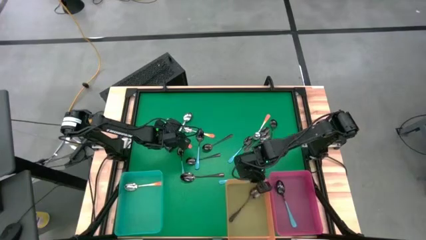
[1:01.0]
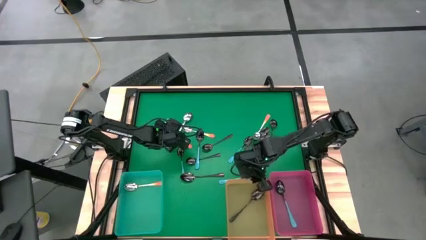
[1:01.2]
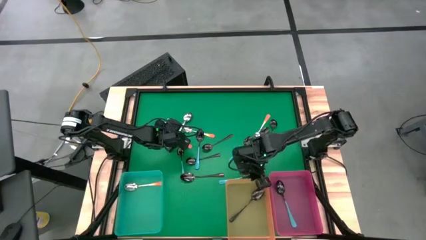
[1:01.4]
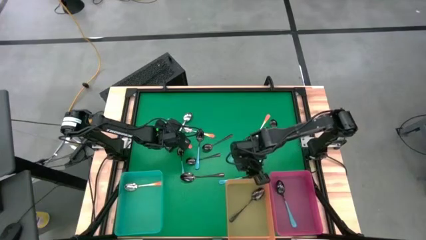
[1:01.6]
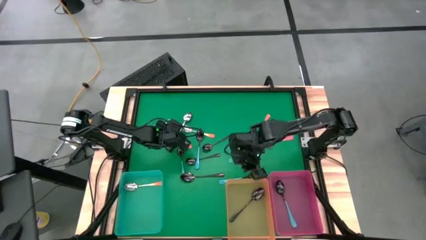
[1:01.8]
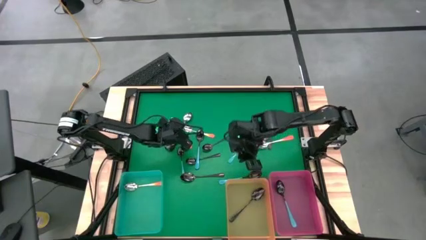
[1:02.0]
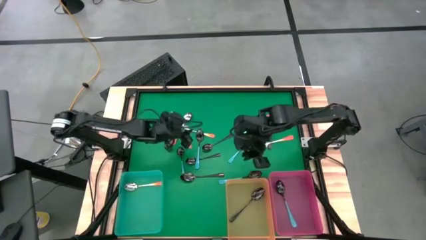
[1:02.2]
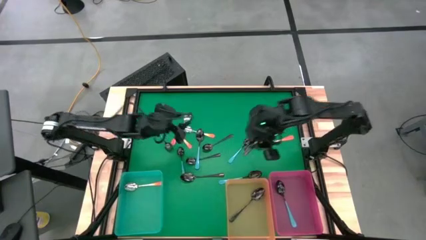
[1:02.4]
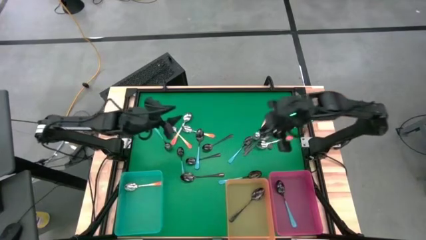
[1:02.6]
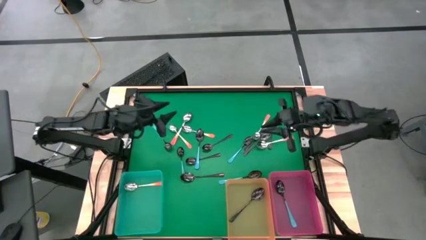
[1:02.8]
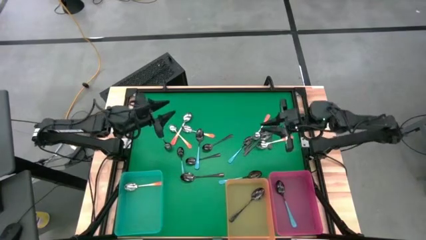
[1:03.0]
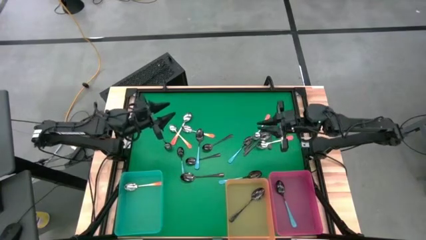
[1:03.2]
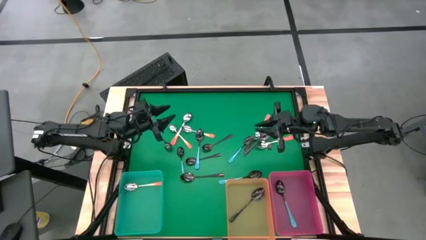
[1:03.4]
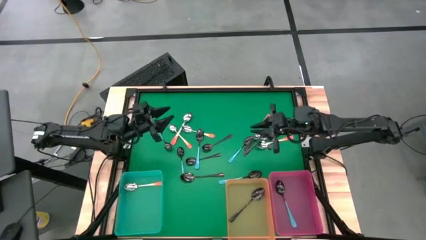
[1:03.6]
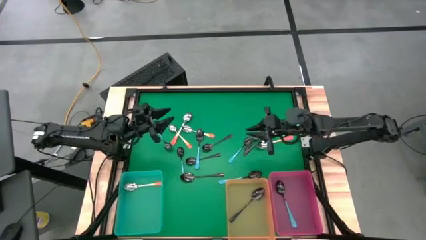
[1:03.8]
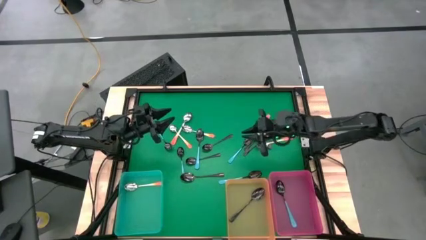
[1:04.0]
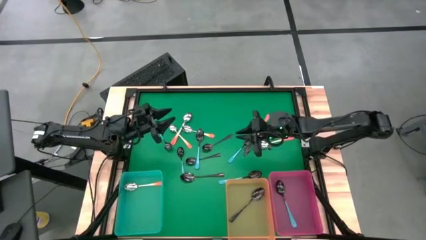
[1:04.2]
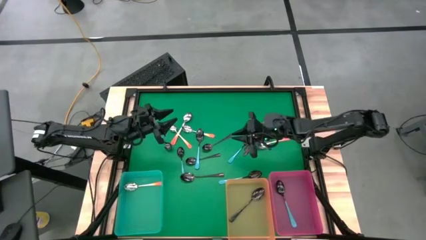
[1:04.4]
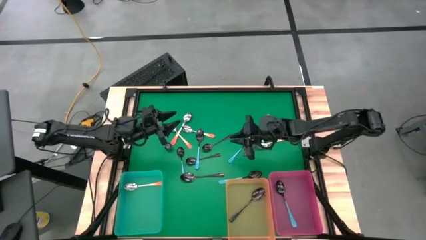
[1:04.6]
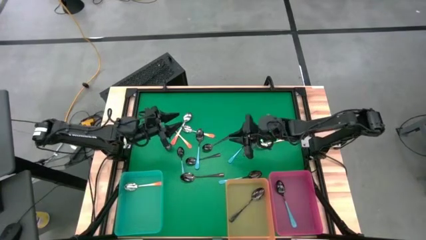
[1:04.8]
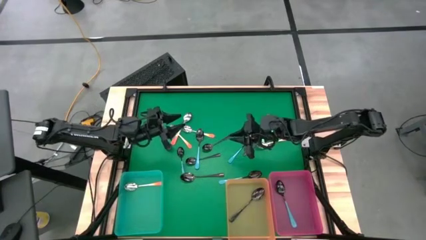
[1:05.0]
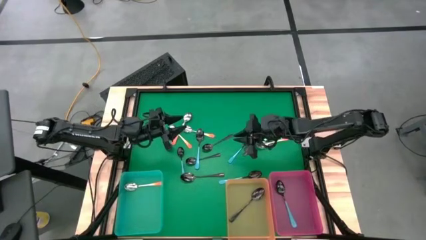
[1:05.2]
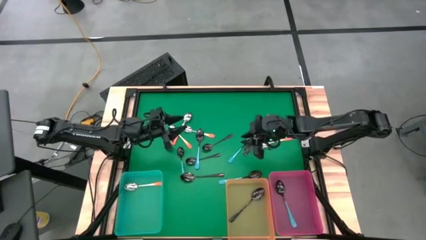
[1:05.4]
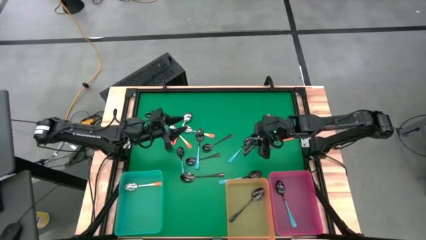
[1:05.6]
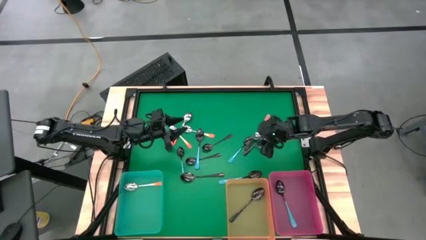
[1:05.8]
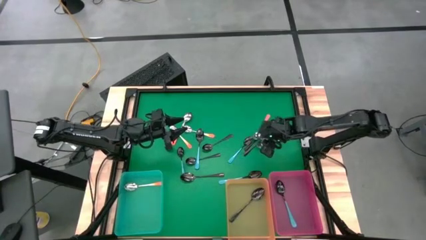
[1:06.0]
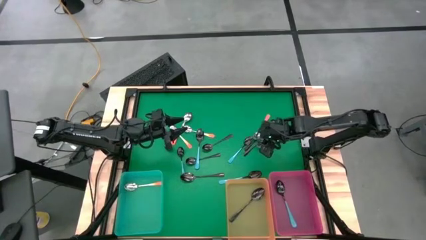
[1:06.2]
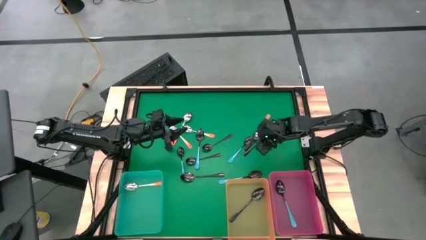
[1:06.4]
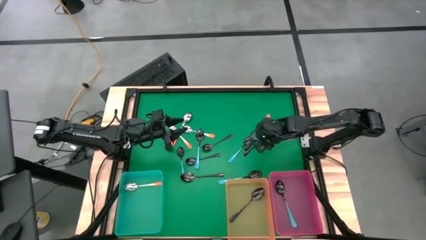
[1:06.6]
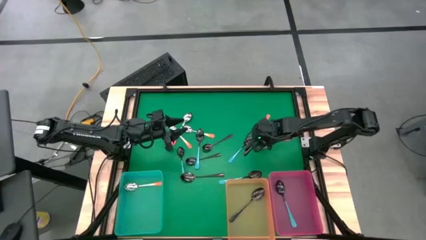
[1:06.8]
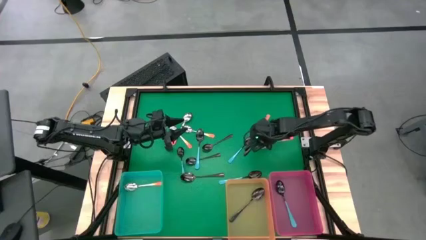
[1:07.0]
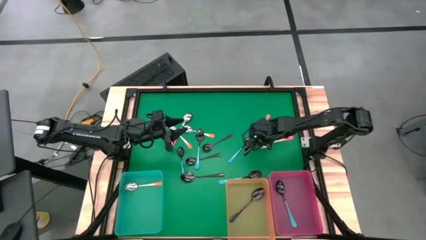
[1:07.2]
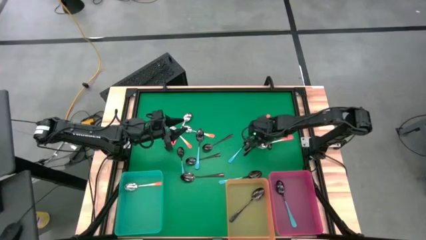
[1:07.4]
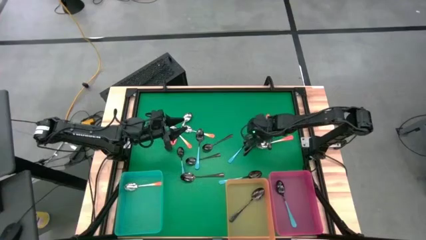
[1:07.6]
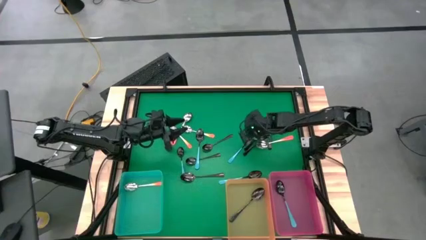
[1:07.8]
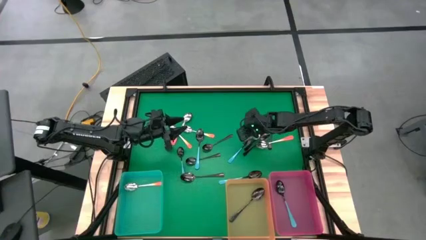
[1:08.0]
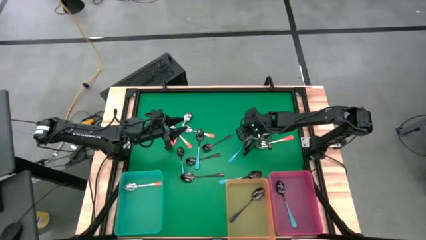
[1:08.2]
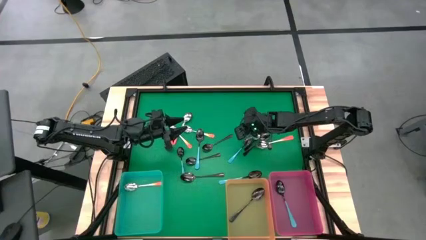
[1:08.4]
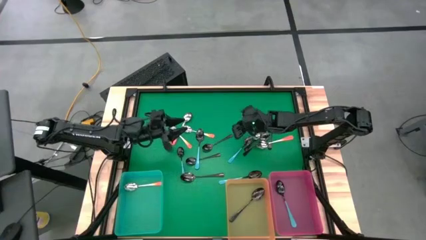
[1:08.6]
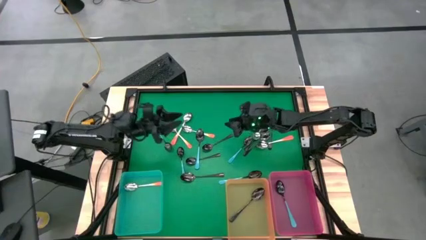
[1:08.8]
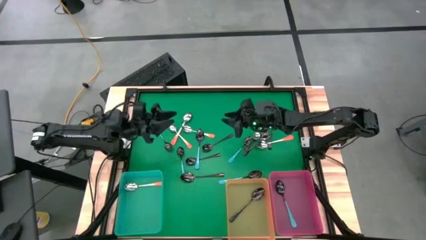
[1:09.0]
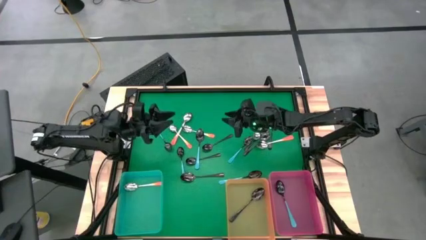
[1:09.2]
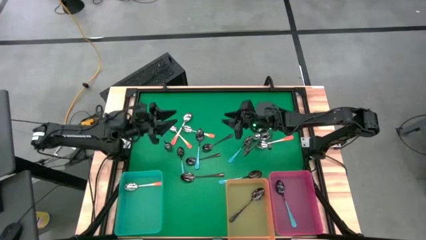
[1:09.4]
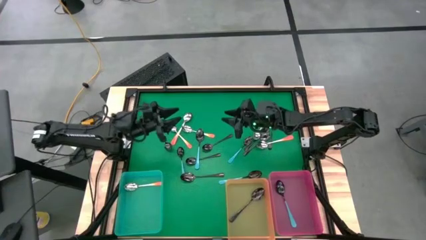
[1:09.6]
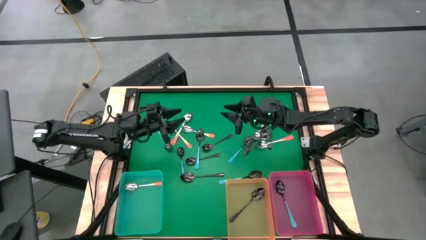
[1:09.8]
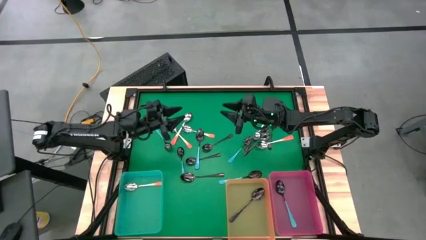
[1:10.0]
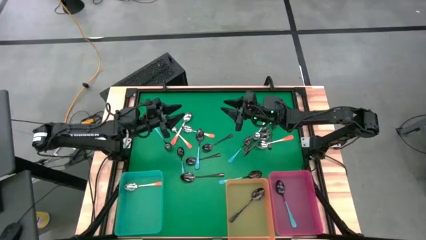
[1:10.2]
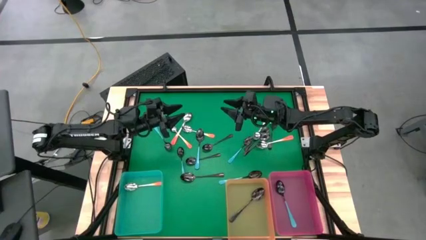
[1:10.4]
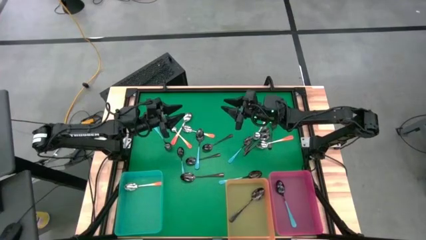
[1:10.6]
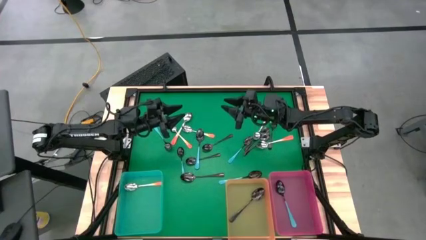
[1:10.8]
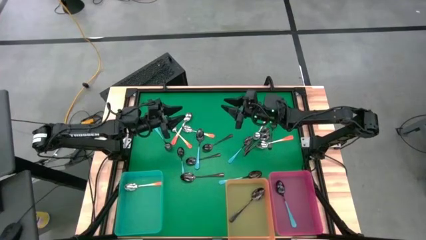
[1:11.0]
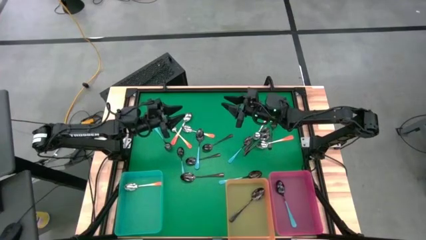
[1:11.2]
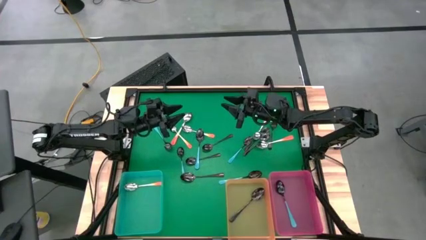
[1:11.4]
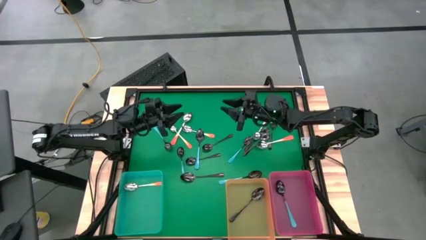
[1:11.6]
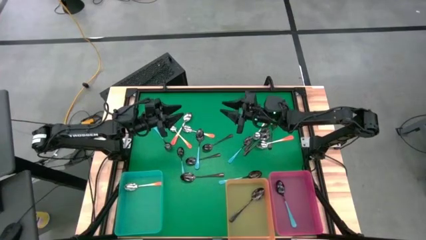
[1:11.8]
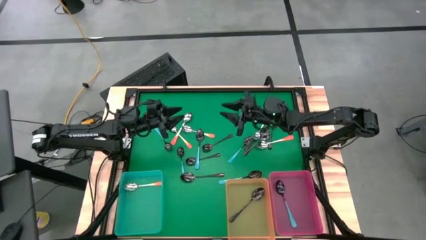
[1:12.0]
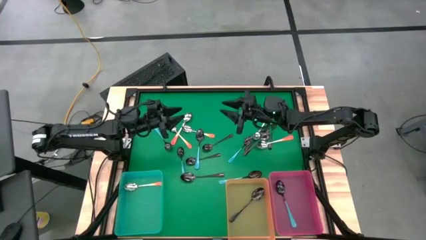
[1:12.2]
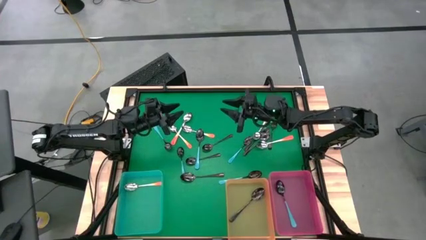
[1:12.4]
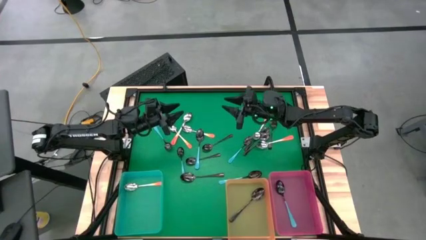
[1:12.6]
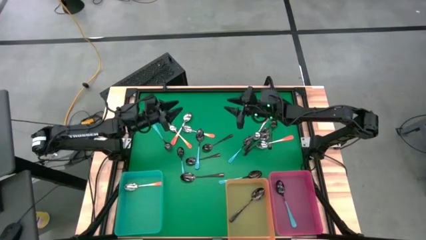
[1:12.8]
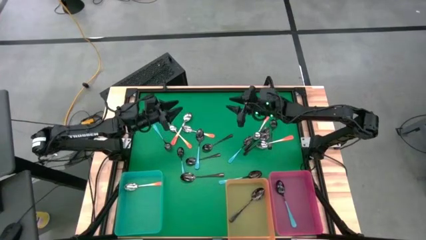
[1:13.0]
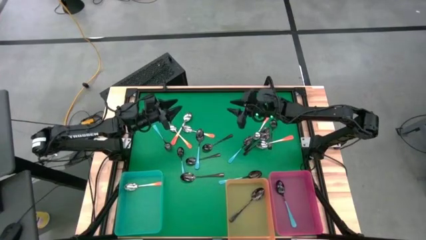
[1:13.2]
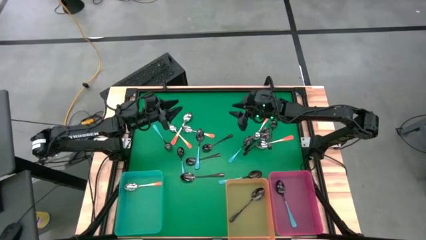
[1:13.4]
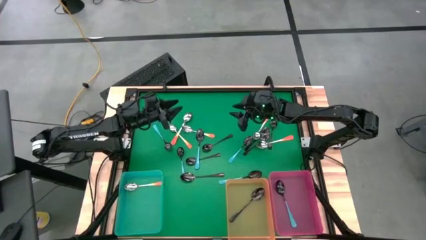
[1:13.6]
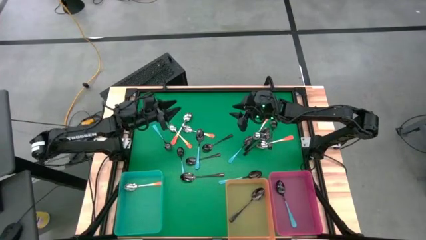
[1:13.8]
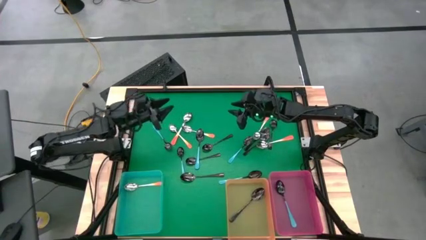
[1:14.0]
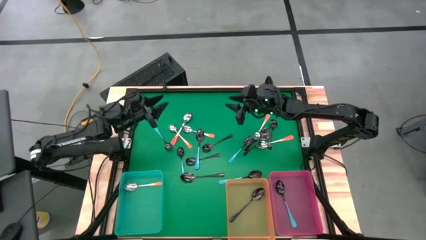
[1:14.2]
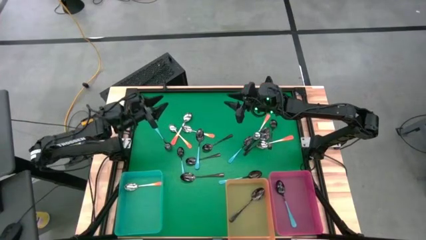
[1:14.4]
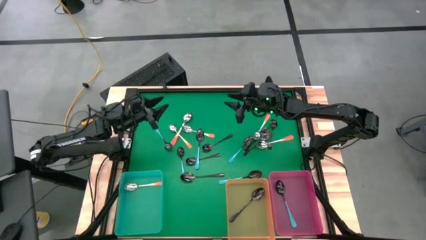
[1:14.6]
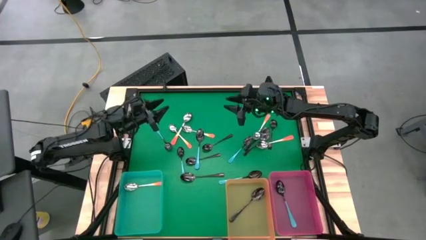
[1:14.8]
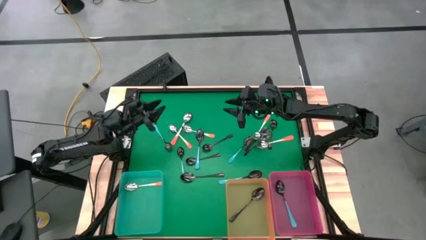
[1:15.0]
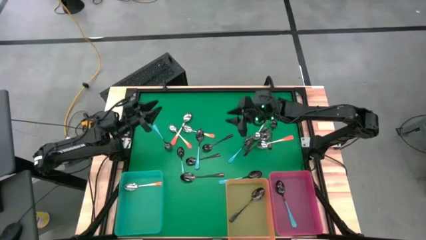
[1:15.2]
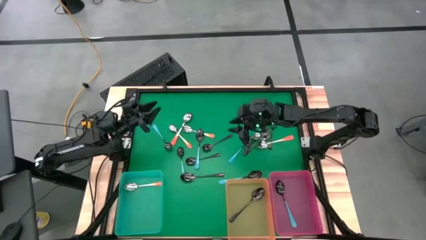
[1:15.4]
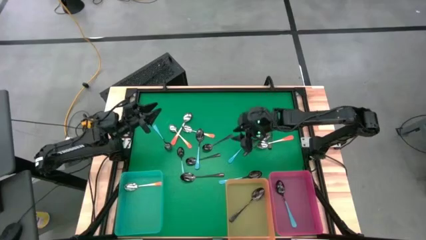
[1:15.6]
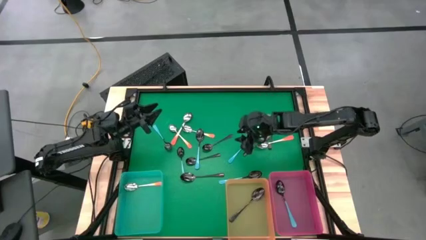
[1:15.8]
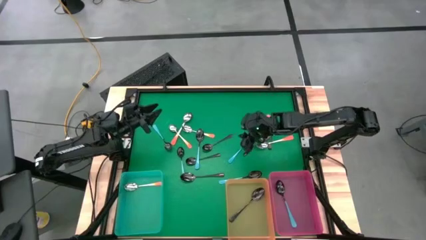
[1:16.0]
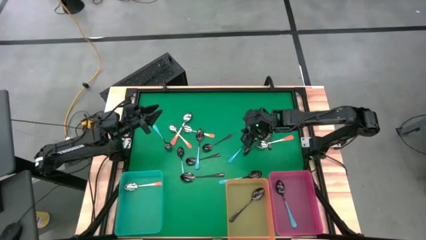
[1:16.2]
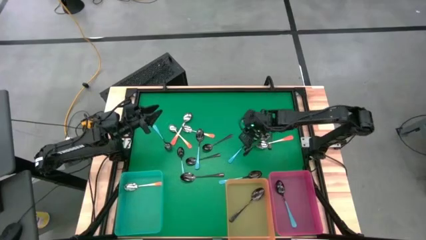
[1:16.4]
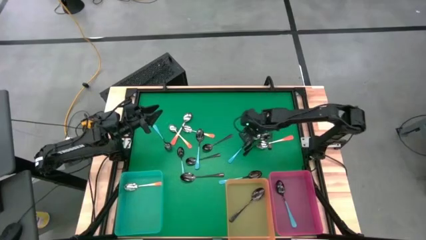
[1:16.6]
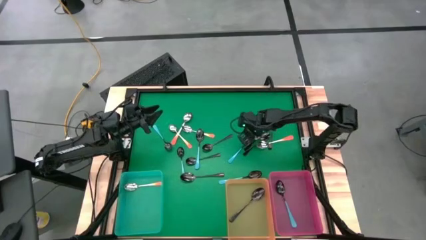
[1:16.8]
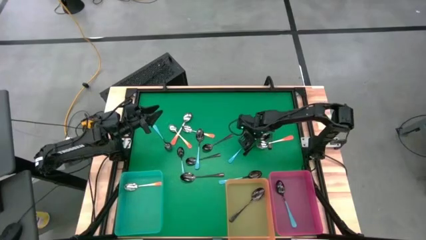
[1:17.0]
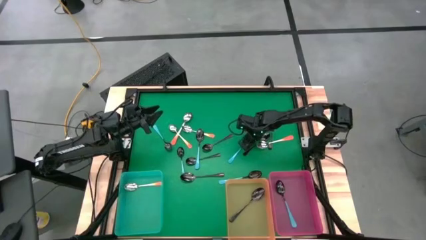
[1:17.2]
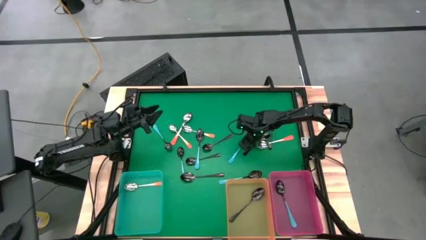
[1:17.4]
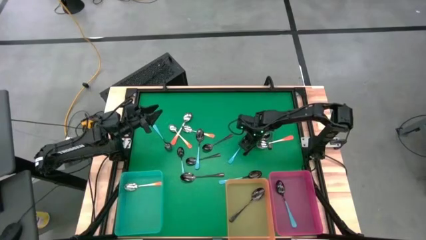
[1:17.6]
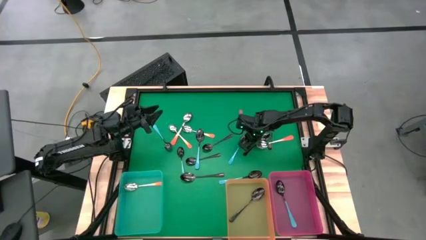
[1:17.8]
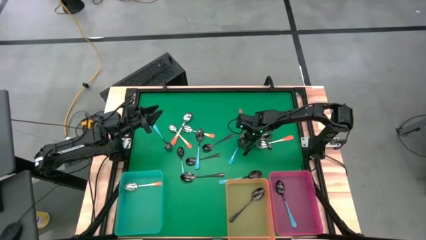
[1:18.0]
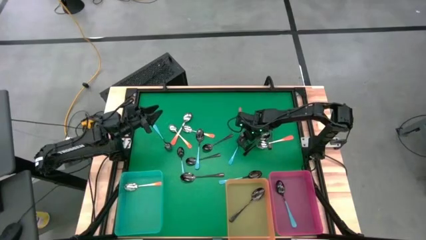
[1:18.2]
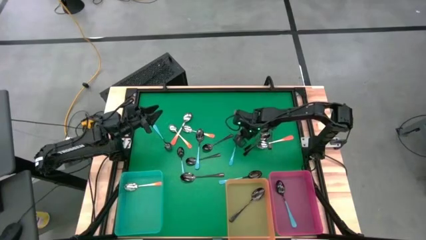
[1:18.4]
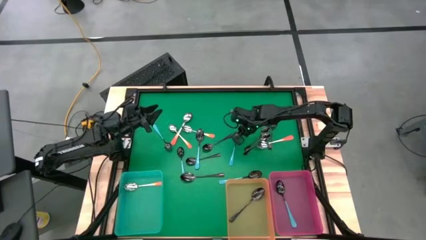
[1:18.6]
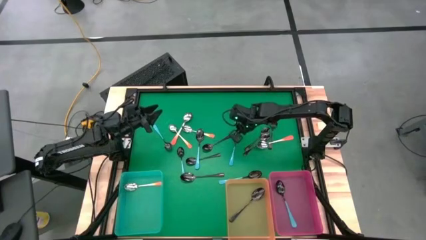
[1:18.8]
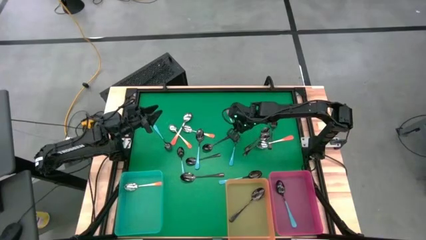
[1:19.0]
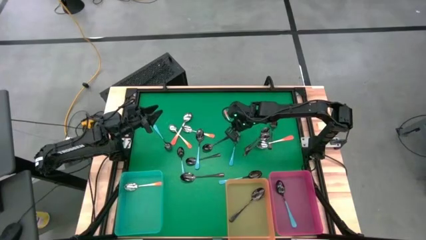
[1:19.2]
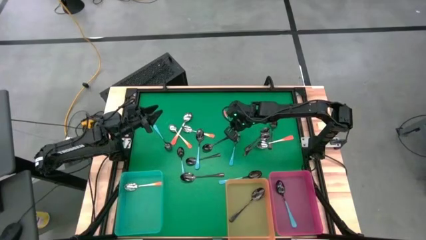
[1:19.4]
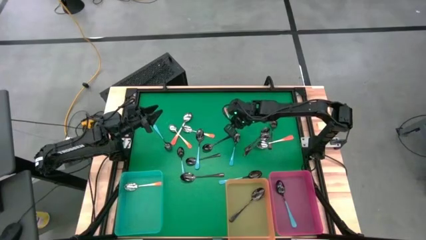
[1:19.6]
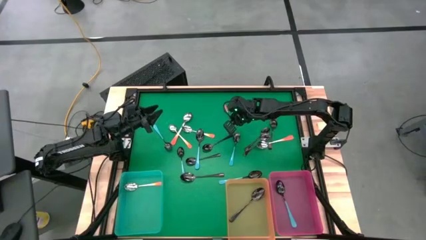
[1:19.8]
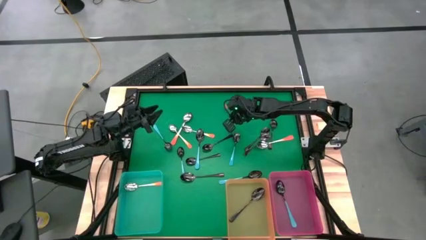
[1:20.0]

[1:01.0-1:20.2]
Task: Sort silverware by color (type)
Put the blue spoon into the pink bin
